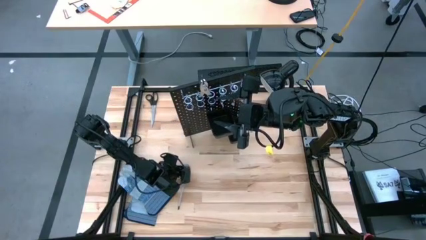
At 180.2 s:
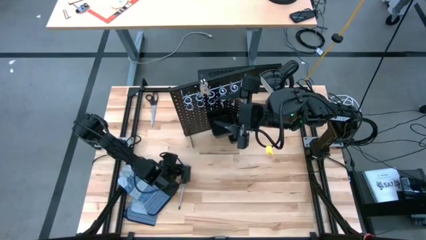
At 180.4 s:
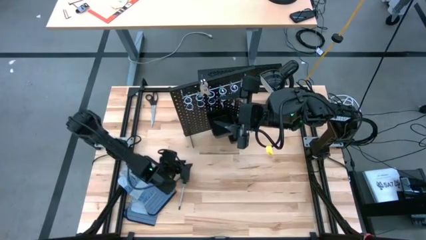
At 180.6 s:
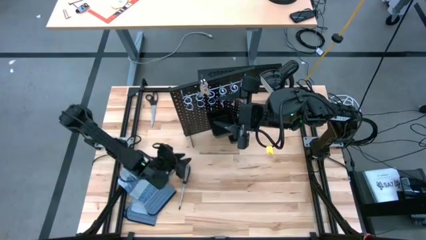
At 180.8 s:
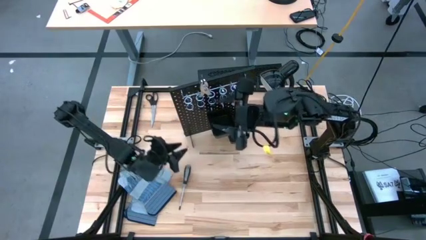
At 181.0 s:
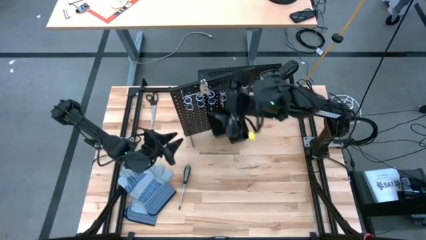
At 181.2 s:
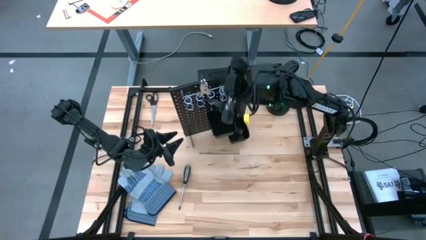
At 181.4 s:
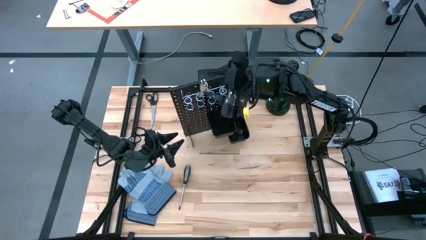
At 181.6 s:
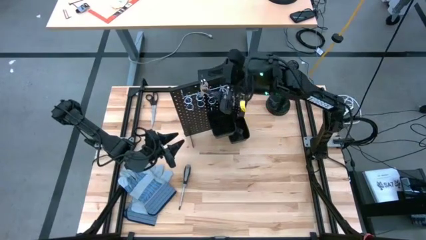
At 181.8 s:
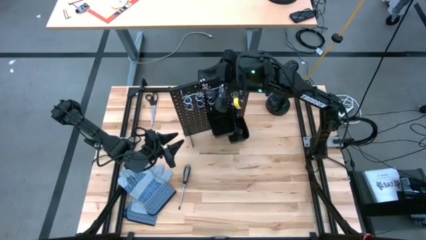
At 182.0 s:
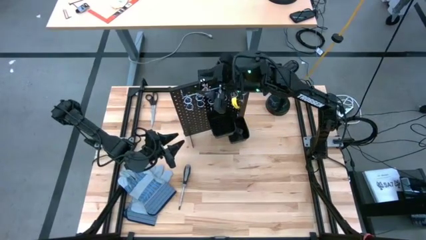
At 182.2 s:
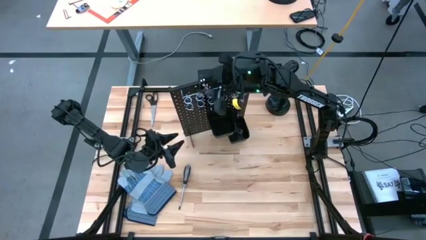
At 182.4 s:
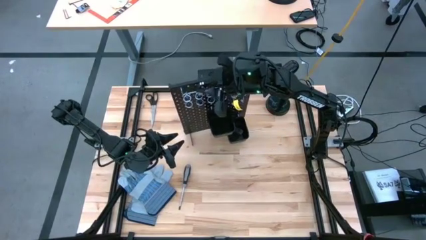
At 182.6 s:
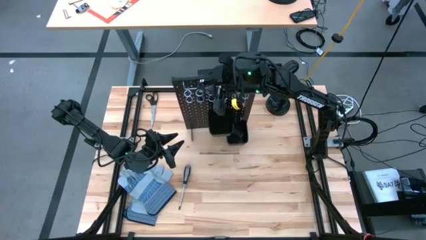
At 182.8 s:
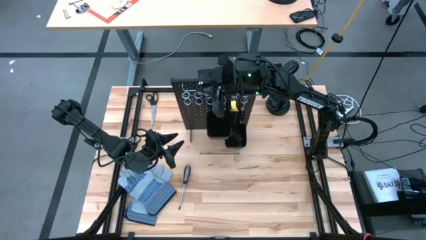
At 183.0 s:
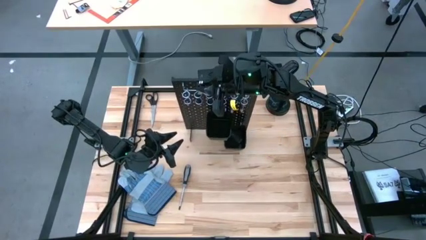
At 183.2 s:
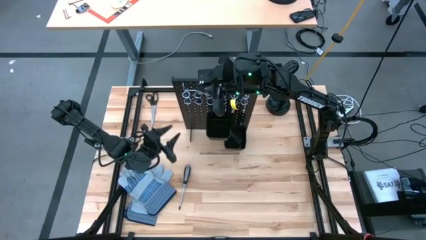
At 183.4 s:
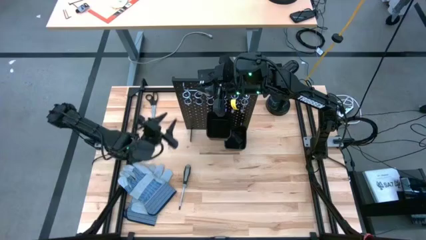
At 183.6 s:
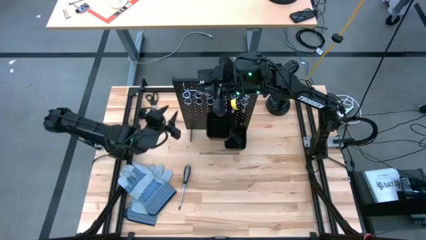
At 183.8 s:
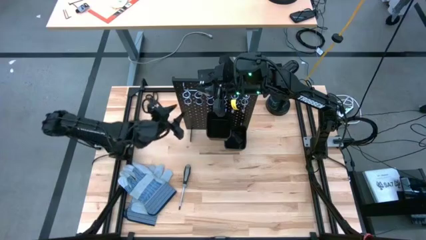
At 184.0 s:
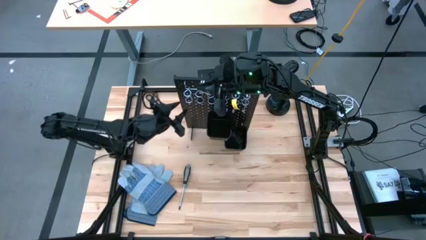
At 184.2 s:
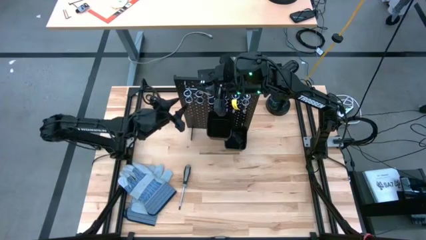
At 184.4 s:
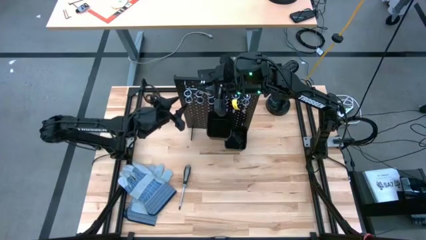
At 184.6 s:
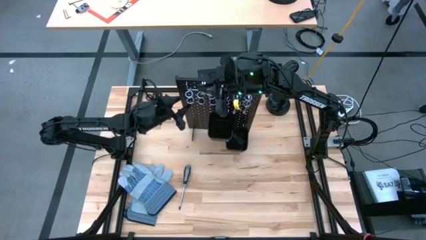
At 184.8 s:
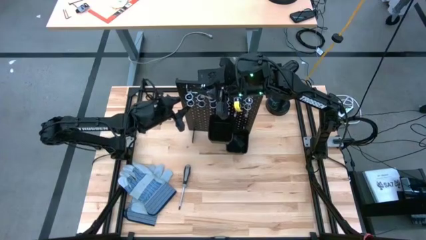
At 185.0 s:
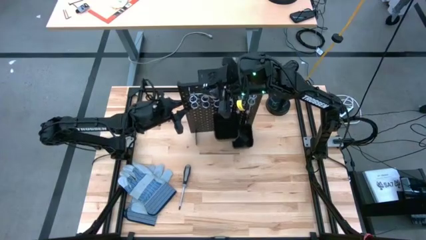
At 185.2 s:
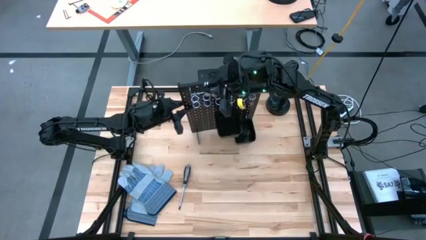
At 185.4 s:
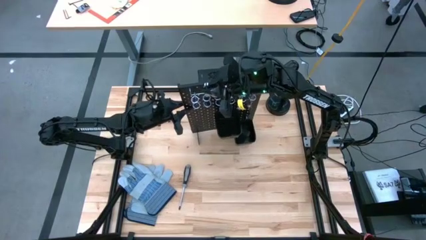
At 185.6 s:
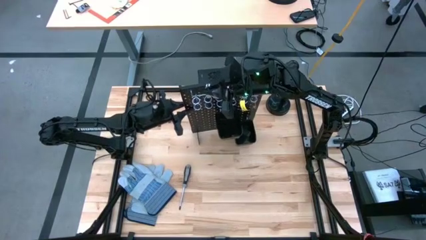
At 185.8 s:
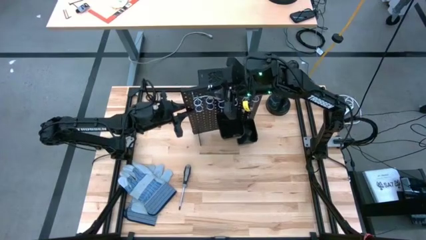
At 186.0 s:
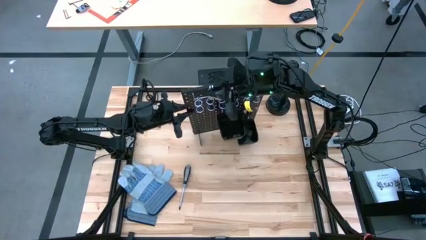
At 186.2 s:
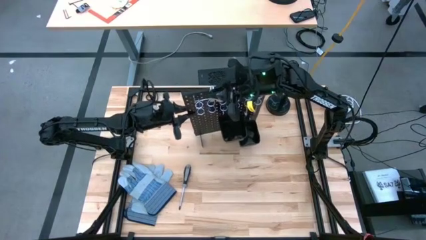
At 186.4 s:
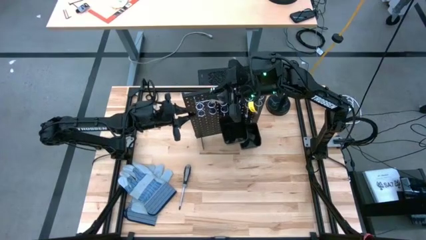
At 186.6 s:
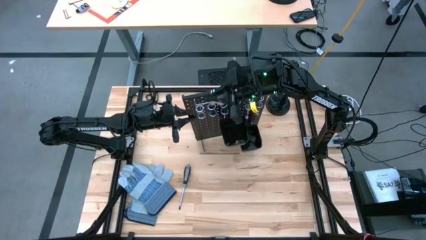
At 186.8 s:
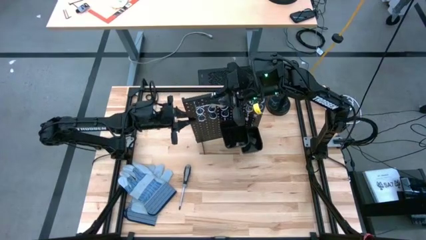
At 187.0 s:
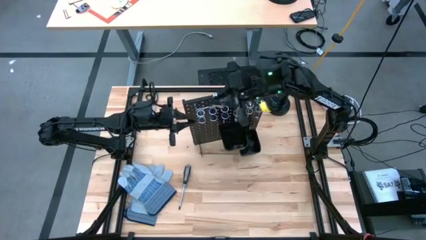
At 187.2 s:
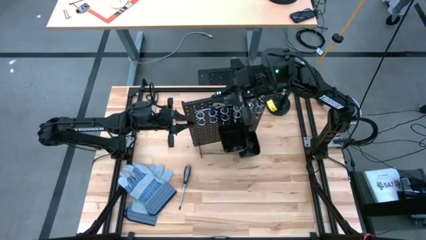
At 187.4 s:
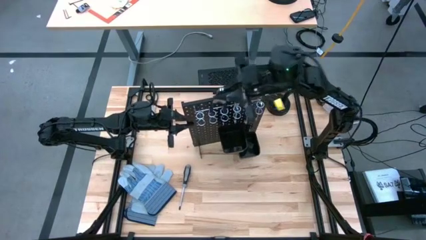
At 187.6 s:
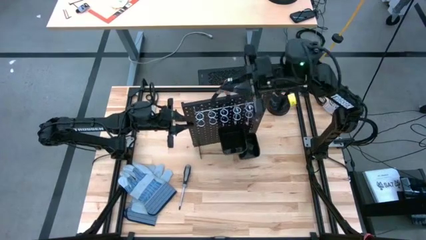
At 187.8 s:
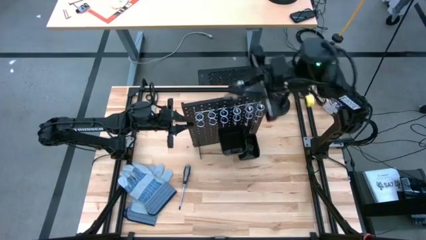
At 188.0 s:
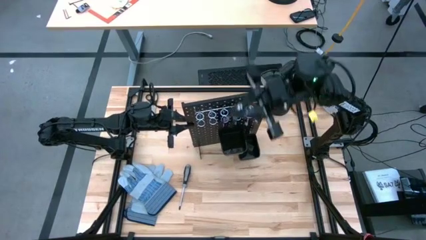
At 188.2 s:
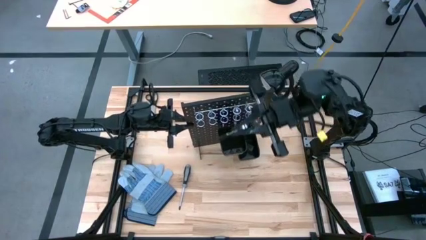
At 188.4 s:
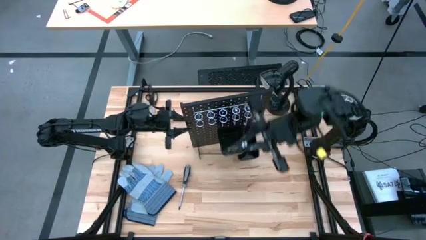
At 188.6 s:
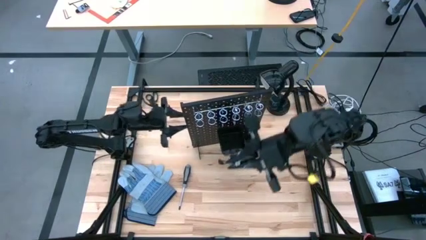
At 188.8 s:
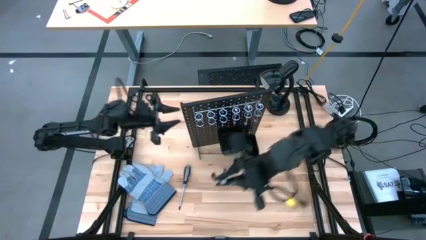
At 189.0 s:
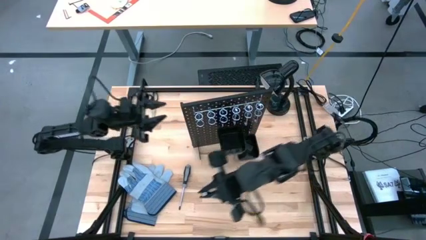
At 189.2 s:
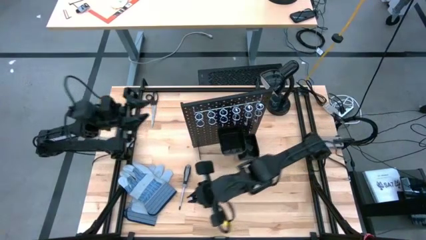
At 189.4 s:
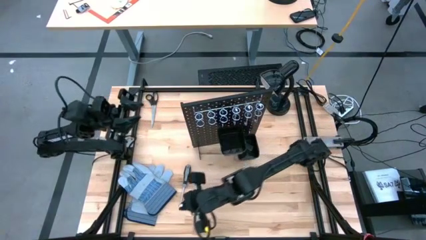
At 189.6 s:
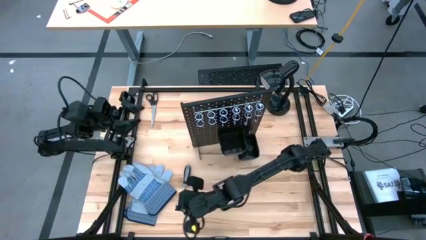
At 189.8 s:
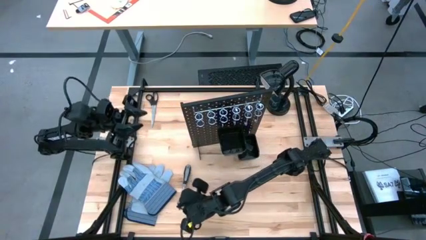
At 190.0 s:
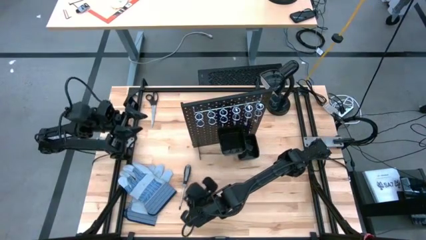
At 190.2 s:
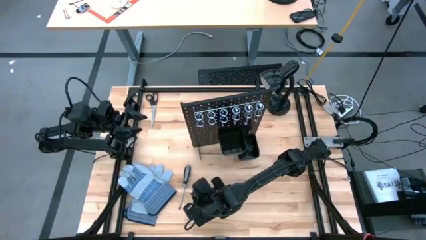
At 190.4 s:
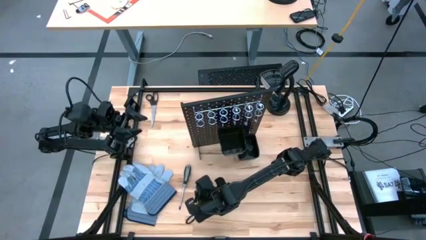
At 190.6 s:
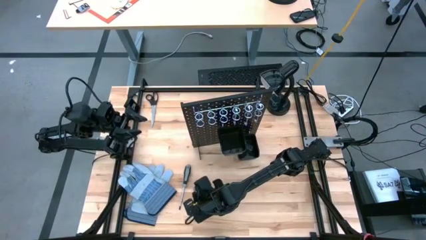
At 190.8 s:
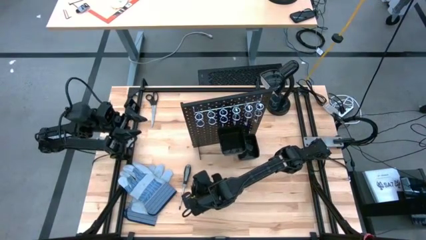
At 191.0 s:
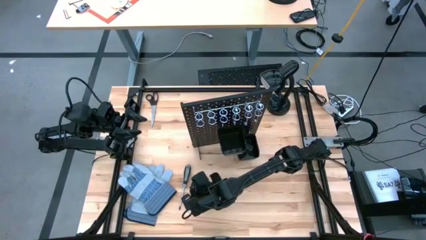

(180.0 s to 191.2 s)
Task: Hang tools onto peg board
Remove the black pliers from the black pegboard

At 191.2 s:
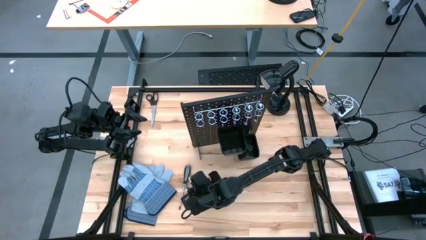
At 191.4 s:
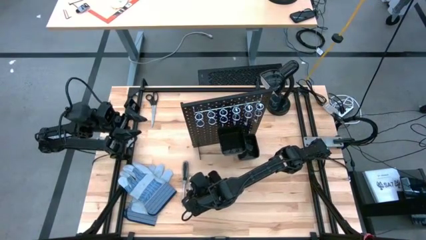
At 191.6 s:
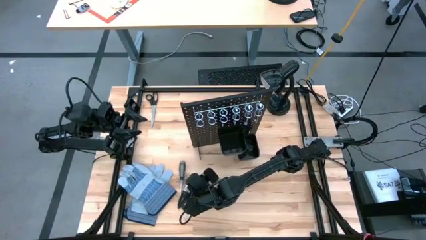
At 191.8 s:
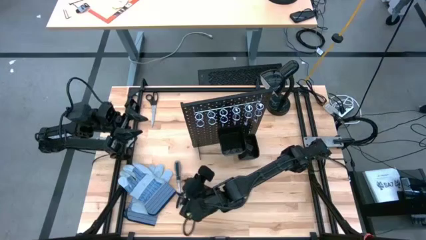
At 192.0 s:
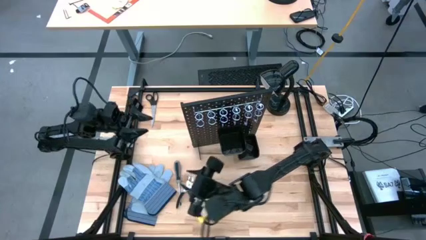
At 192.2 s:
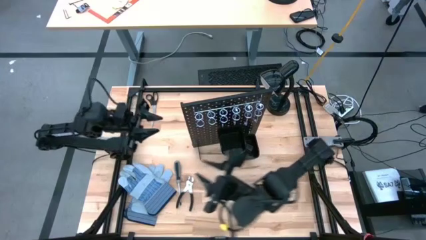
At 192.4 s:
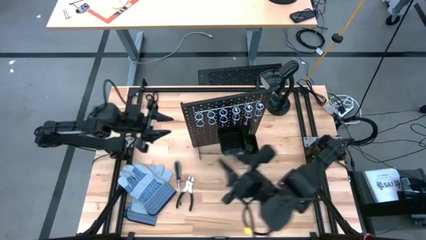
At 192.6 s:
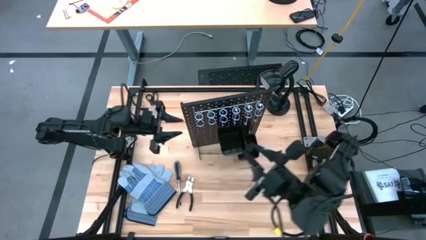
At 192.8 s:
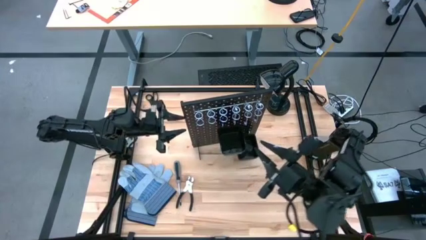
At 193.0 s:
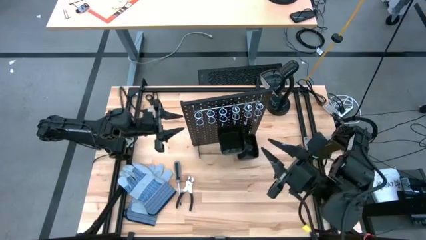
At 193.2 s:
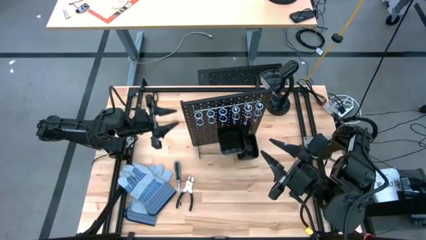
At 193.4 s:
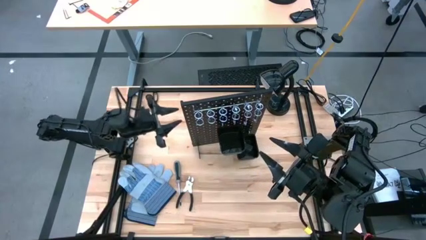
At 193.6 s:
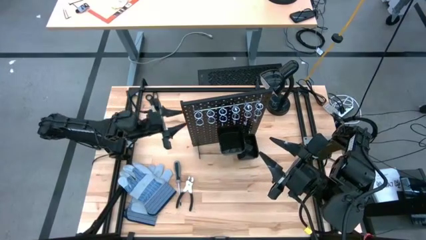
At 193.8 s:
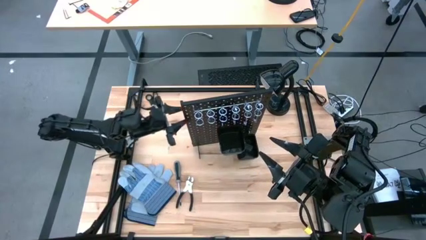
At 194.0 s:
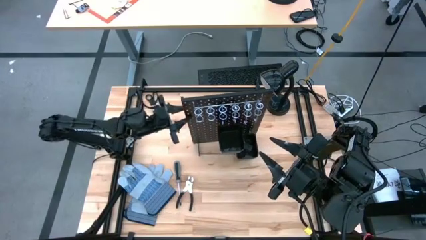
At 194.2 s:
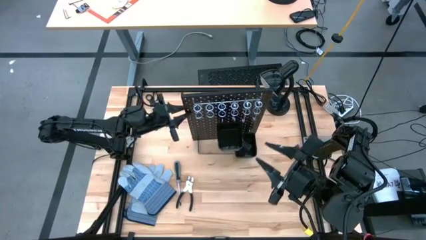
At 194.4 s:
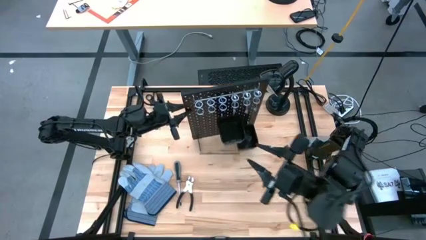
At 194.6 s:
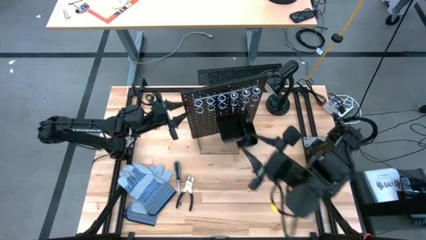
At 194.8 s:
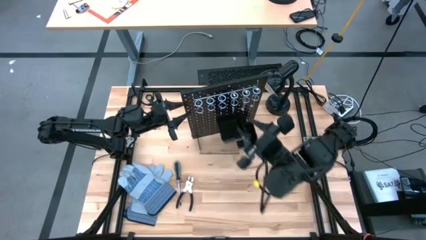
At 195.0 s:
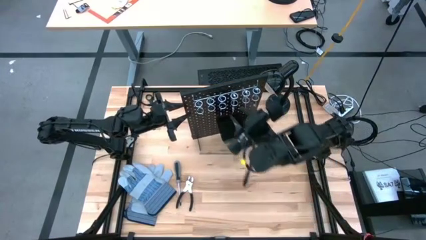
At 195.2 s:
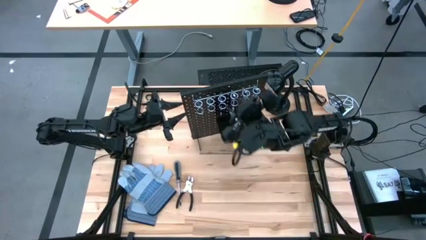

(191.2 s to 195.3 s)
Adjust the black pegboard on the table
